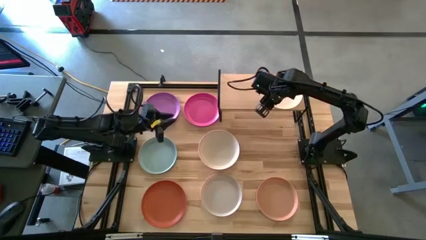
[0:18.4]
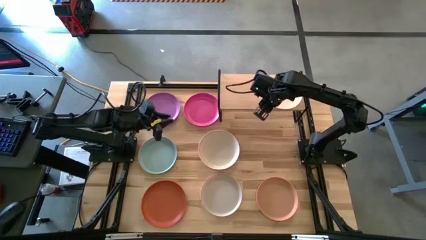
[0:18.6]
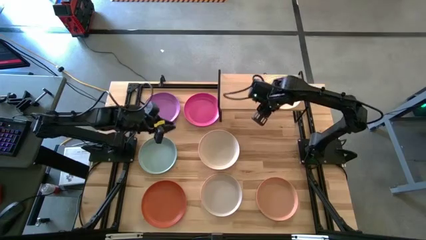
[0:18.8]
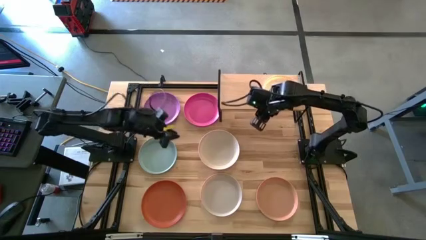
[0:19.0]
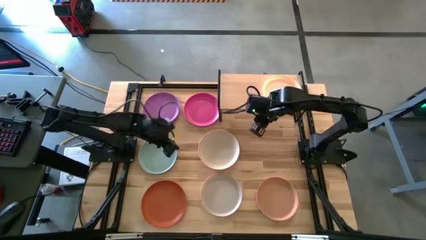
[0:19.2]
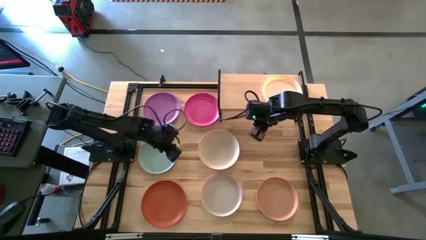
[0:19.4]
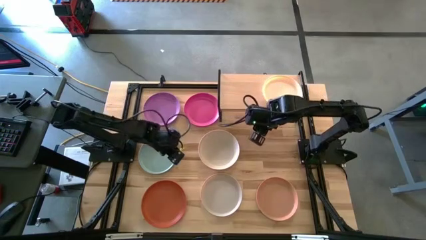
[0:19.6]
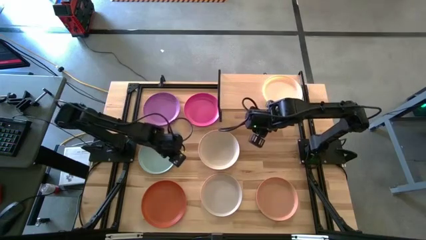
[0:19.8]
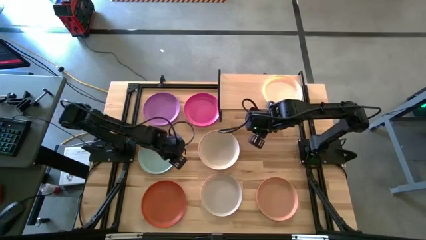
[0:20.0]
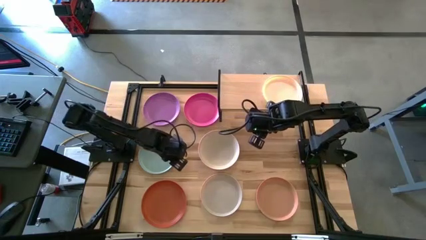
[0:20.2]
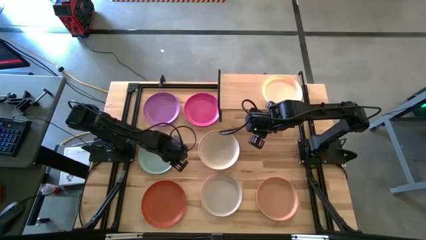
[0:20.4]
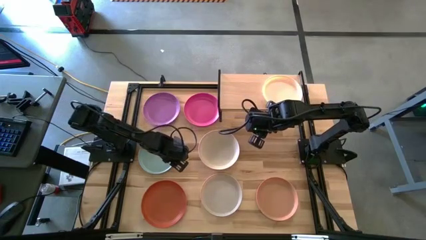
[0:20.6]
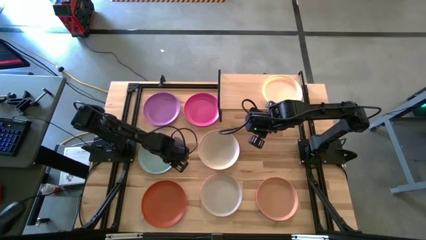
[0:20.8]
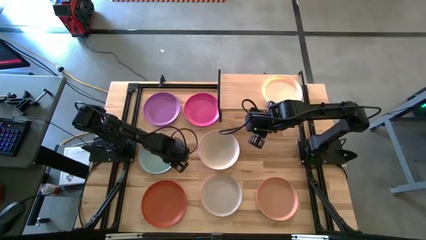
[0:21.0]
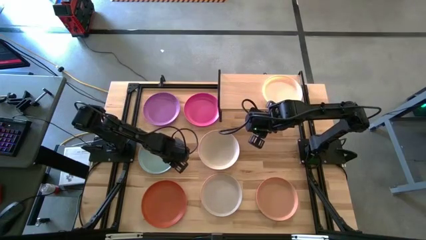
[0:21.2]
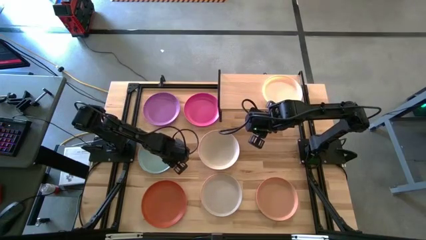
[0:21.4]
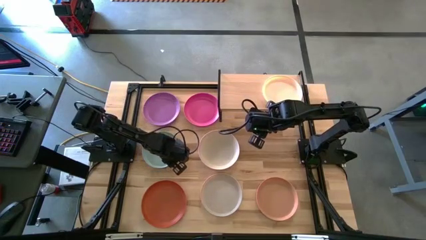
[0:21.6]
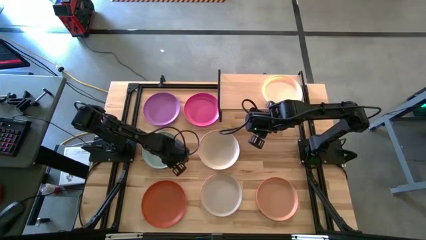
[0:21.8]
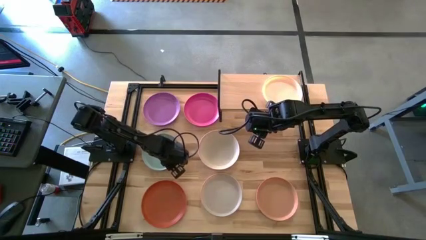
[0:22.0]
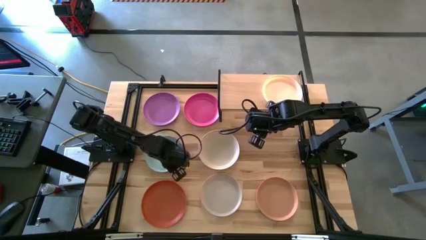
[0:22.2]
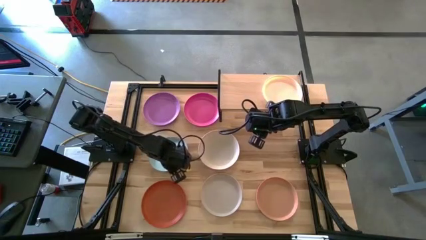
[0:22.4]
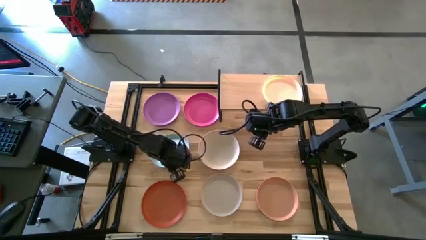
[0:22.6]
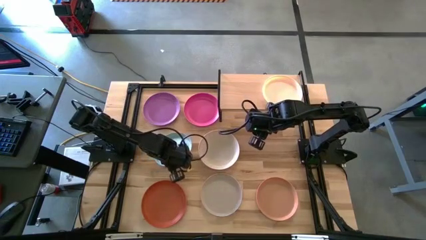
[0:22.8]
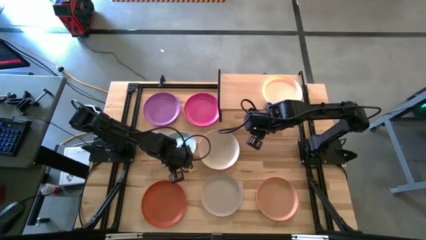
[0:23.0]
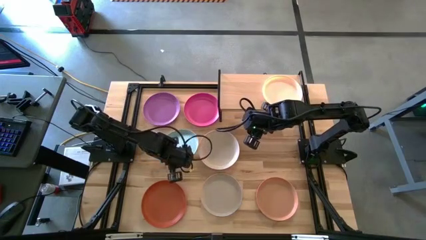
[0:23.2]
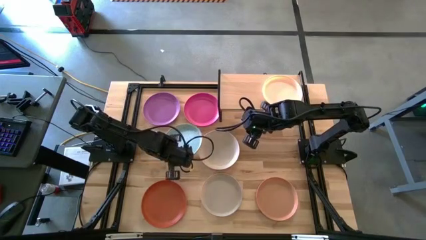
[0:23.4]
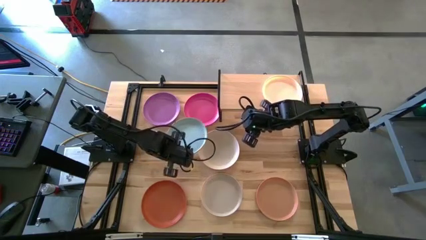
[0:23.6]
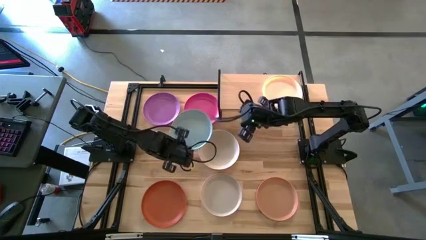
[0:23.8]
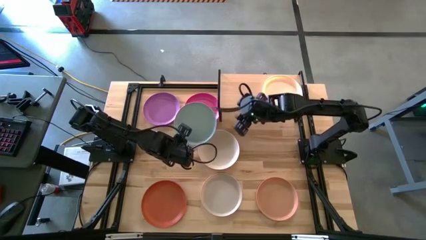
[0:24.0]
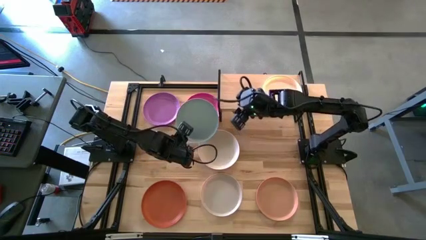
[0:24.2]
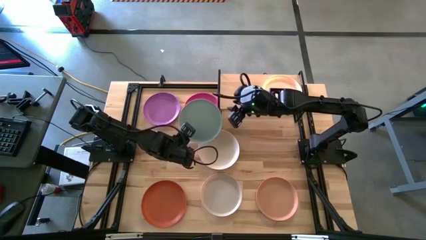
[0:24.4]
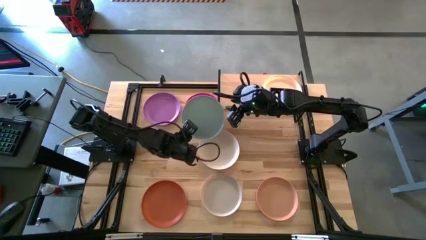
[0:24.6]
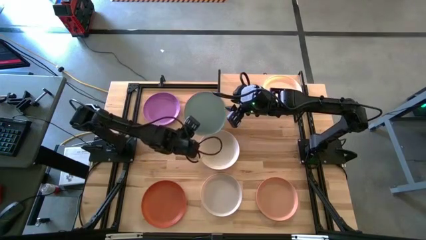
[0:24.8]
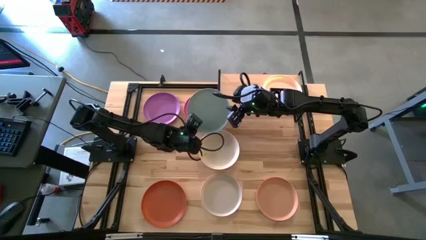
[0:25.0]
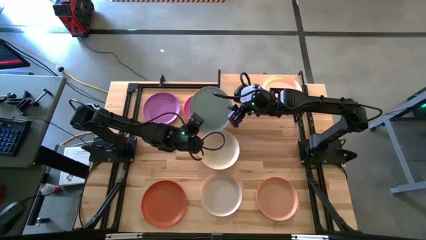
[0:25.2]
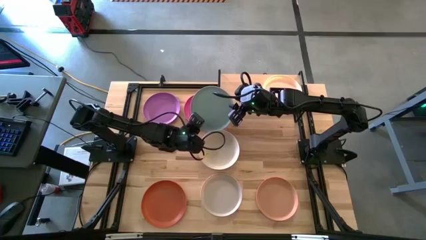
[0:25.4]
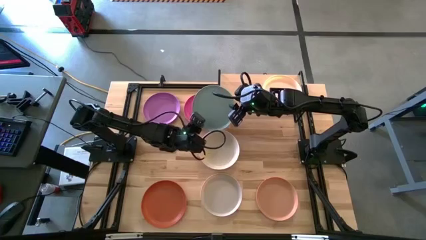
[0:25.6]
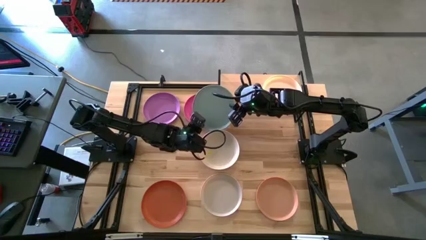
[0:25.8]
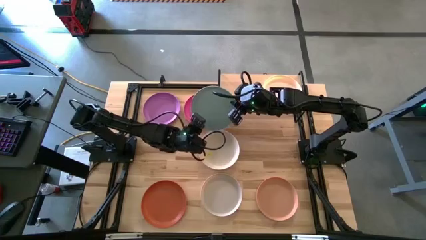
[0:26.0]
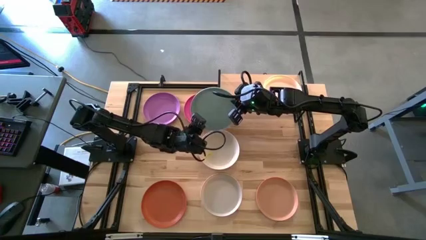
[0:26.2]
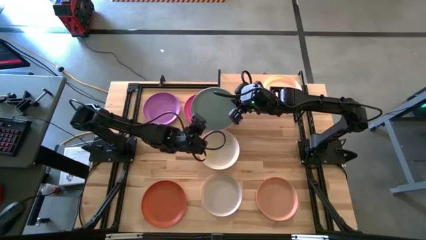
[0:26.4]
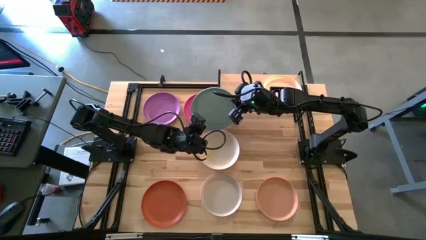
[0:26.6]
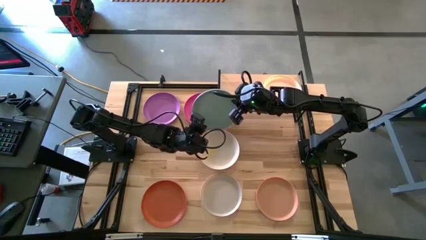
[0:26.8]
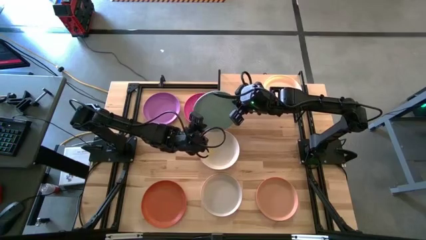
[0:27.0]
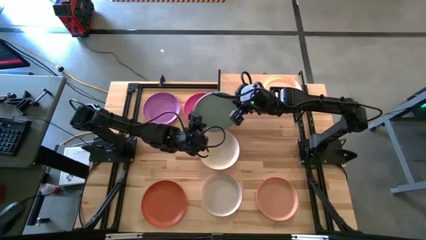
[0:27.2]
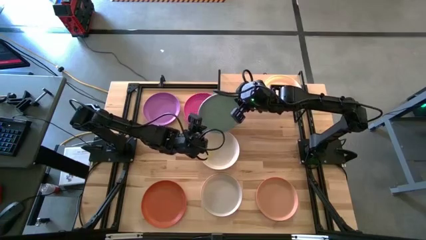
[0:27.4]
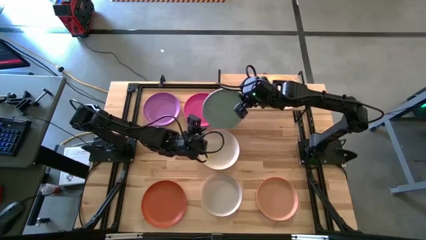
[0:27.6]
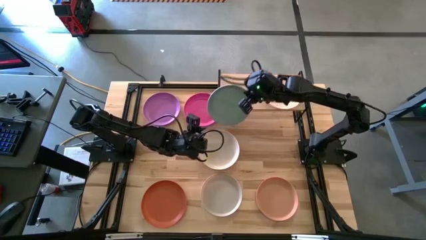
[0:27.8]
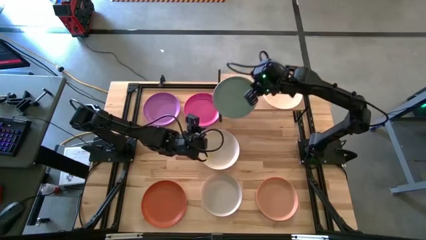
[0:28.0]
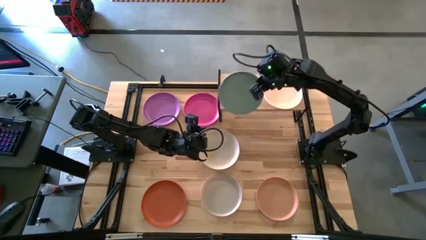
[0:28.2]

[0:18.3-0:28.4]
Task: Place and stack plates onto a shelf
Stack the blue plate on top of the white plate
